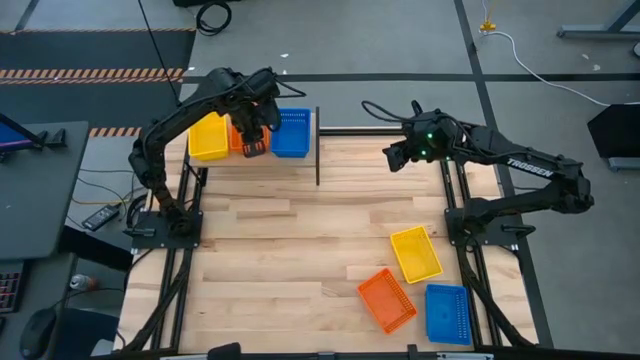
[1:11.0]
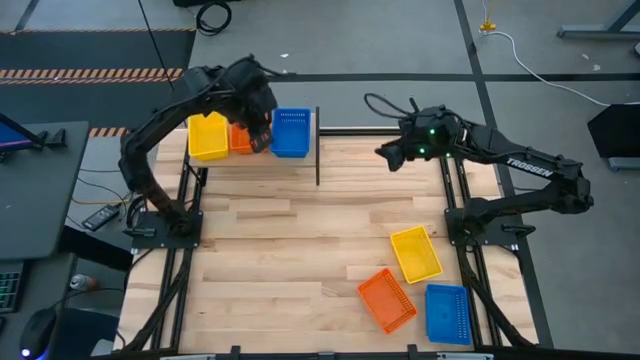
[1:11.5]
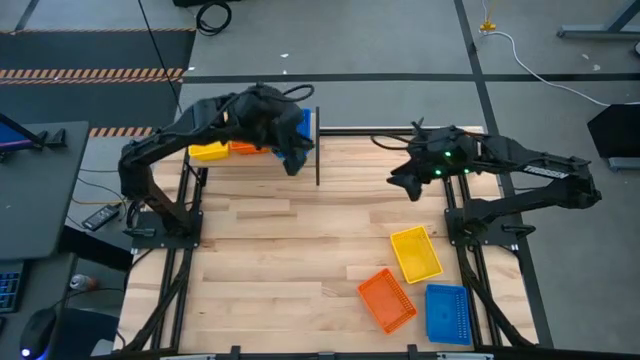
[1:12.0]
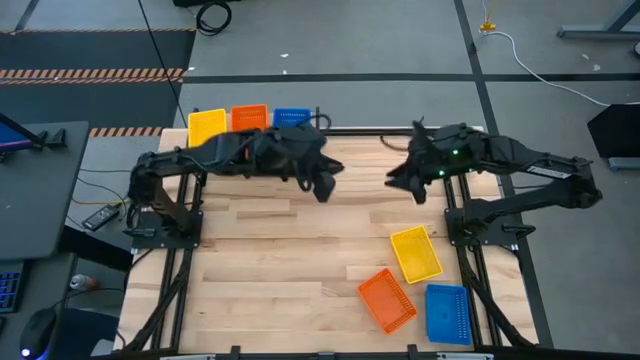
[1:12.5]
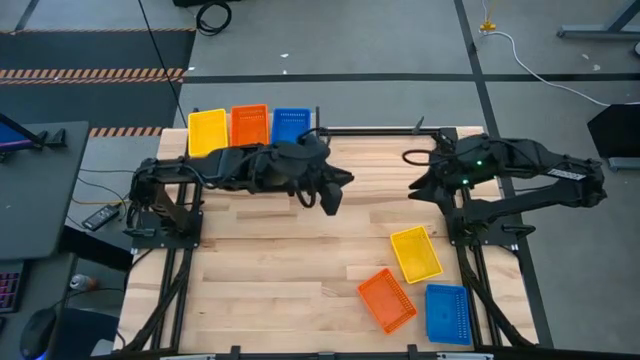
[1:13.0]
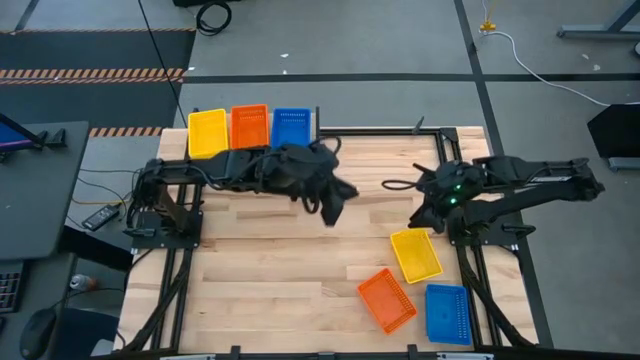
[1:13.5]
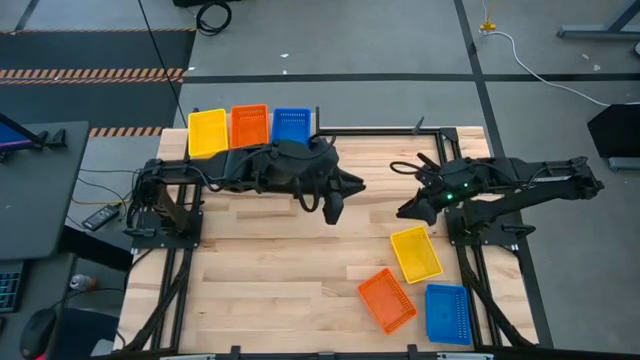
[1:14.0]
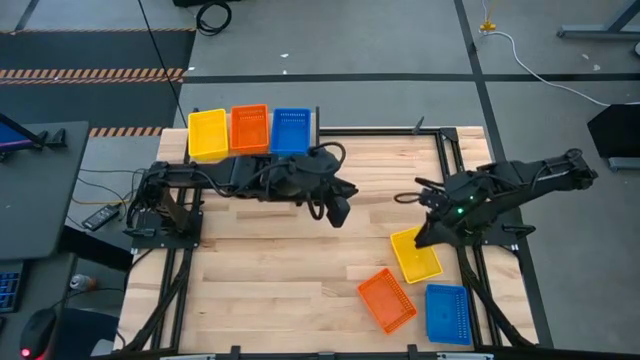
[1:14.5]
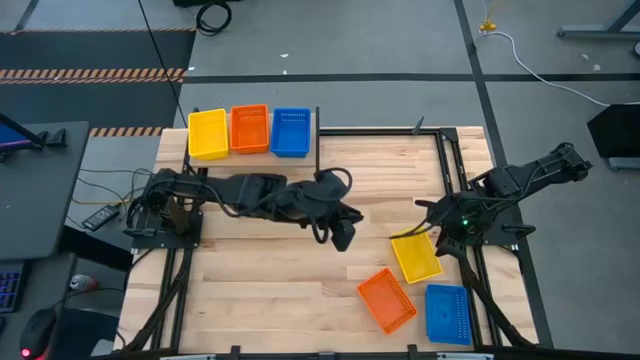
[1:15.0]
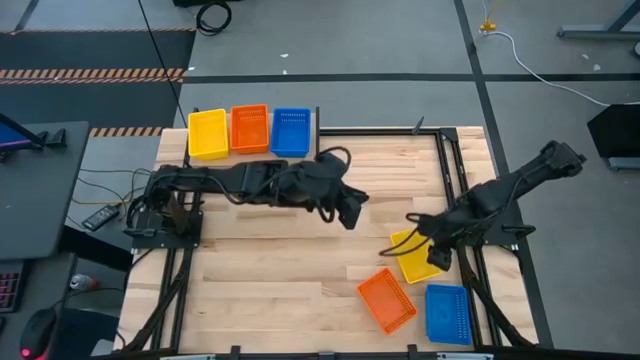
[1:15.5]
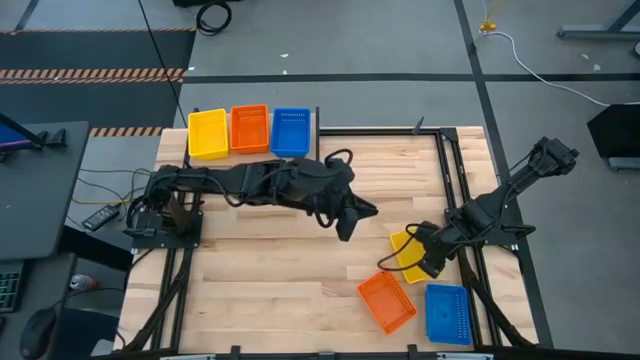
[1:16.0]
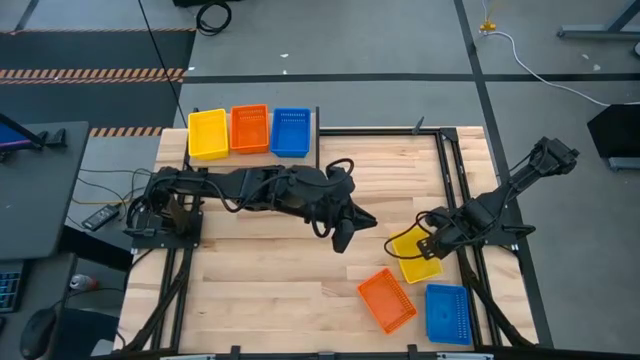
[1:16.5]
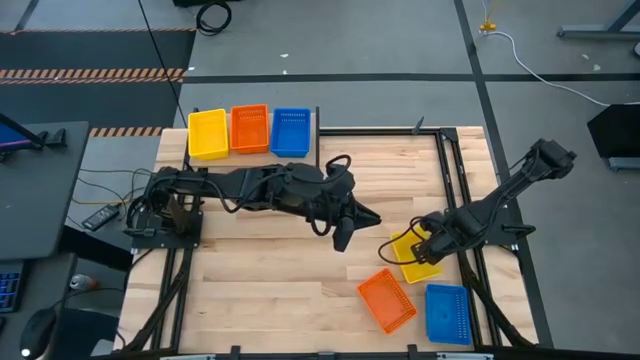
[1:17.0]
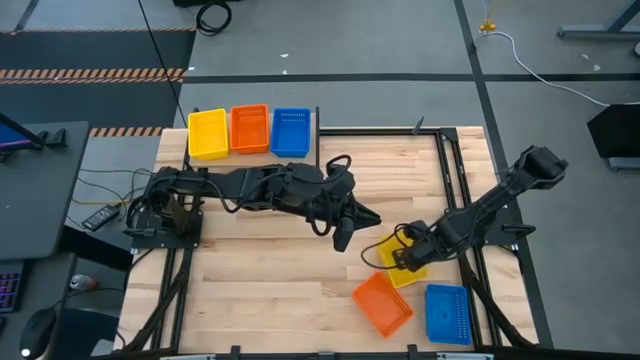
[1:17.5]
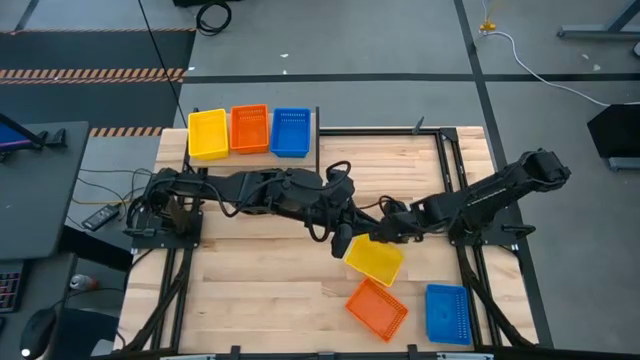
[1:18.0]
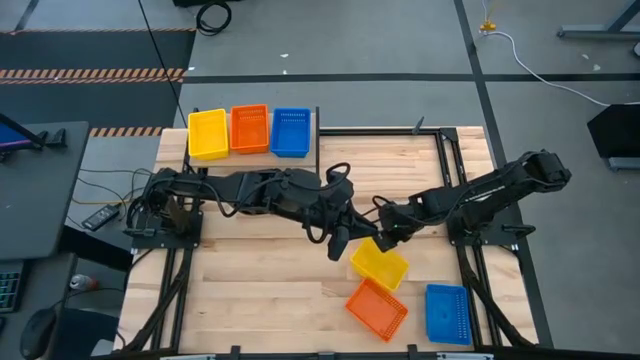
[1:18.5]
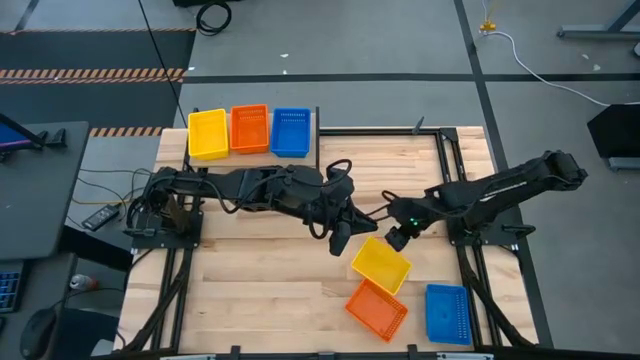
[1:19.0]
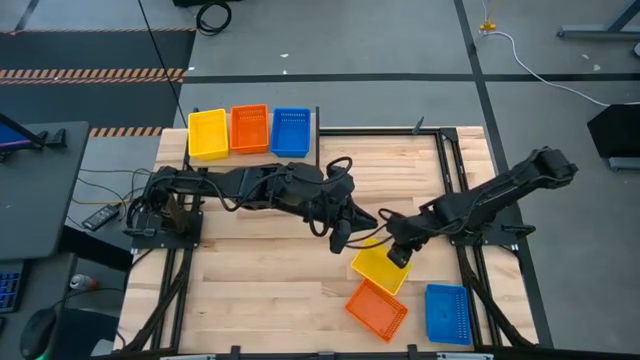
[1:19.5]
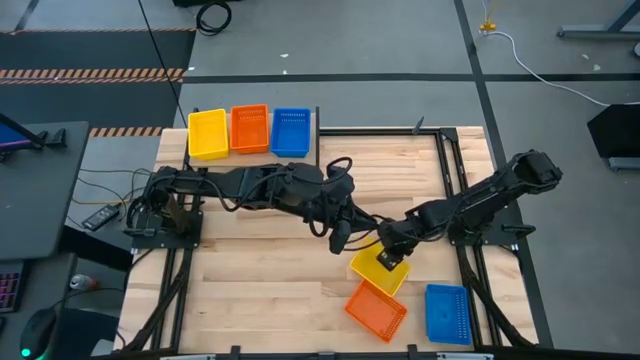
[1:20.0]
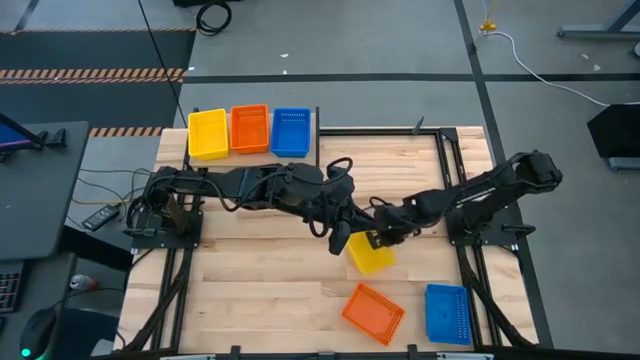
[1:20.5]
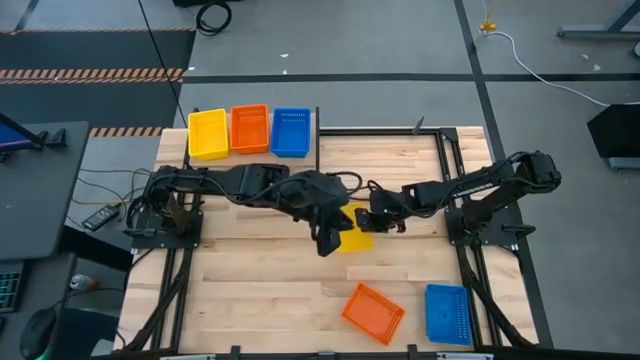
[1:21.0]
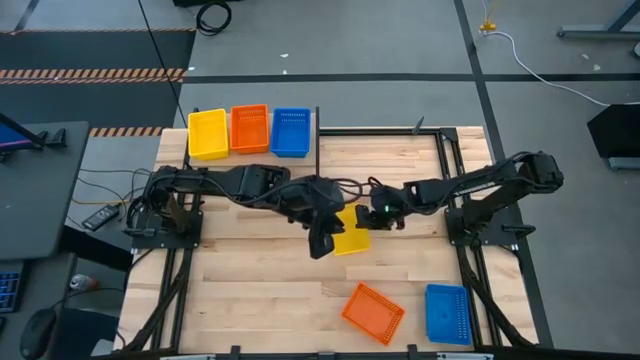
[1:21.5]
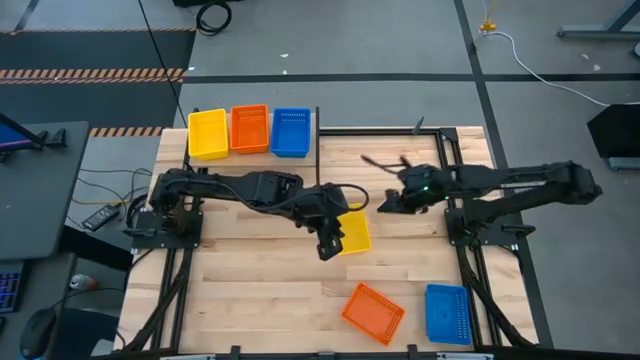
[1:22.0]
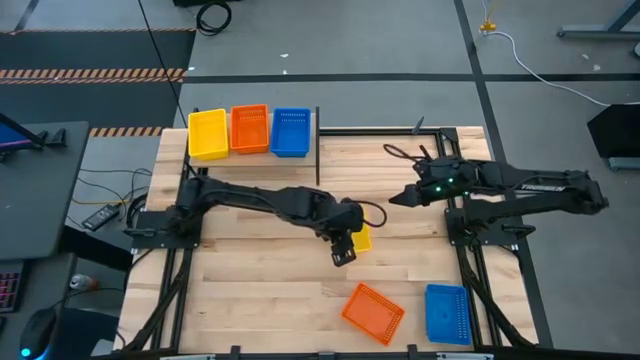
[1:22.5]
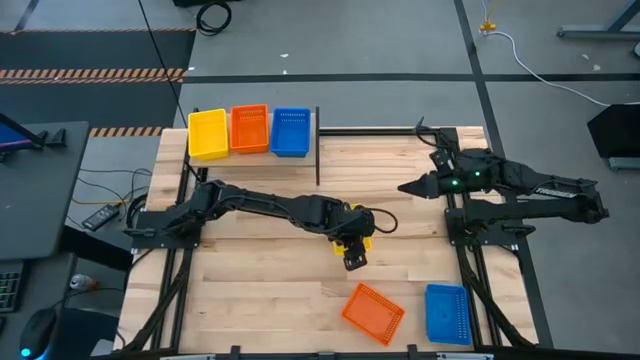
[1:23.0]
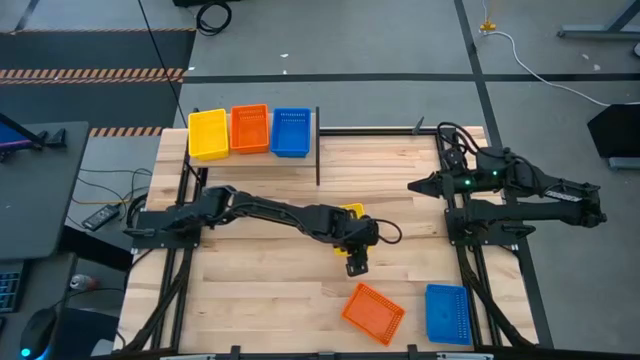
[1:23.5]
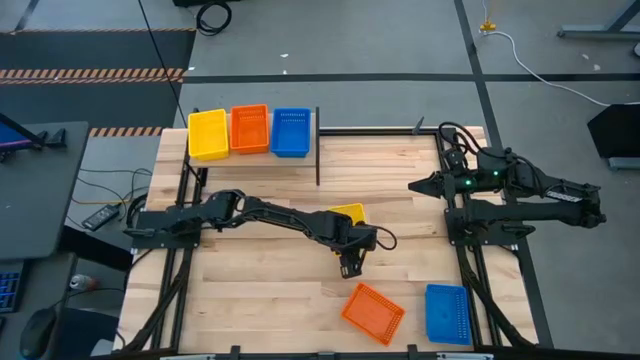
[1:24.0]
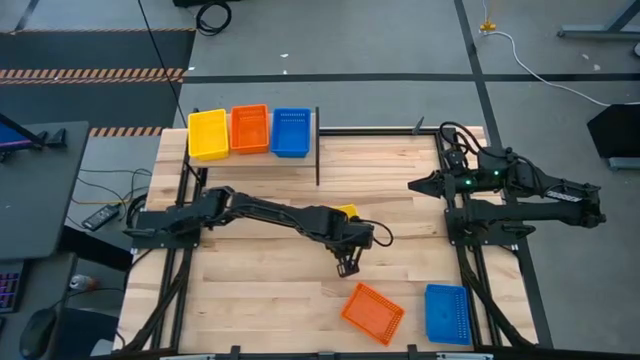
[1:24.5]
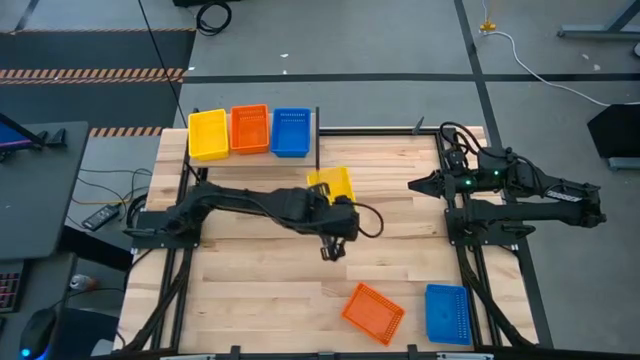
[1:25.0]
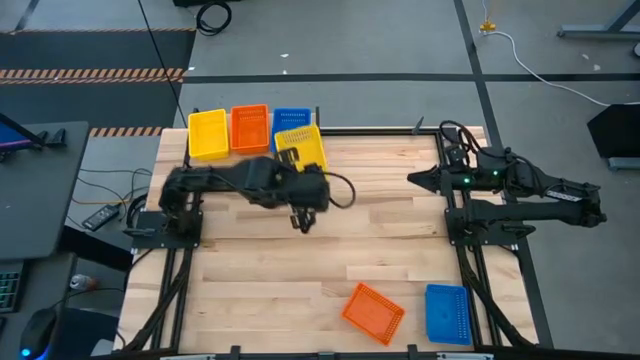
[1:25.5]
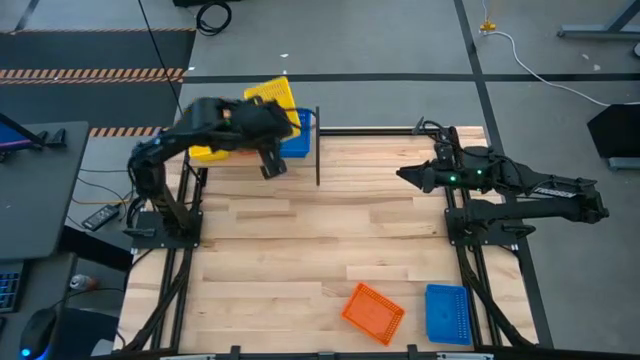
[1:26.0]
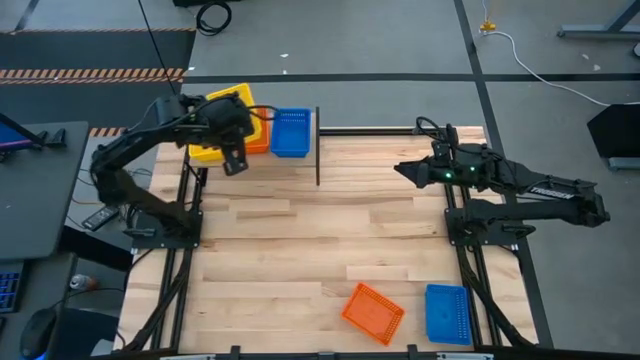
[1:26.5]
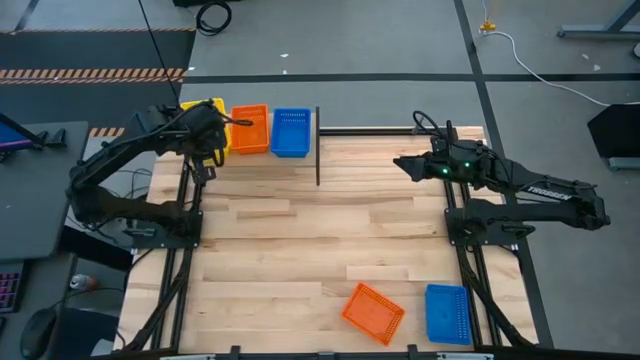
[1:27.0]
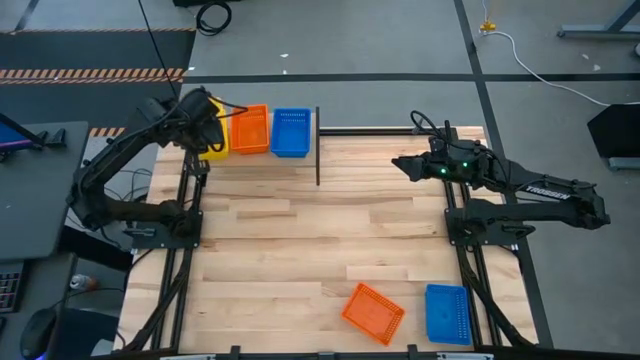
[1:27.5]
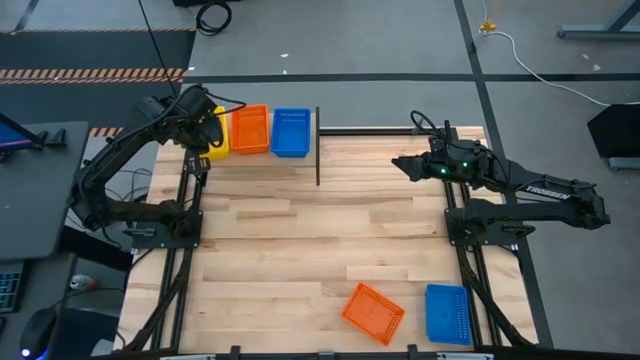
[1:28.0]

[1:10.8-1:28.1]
Task: Stack baskets on shelf by color
Stack the yellow bin on top of the yellow bin on the shelf
